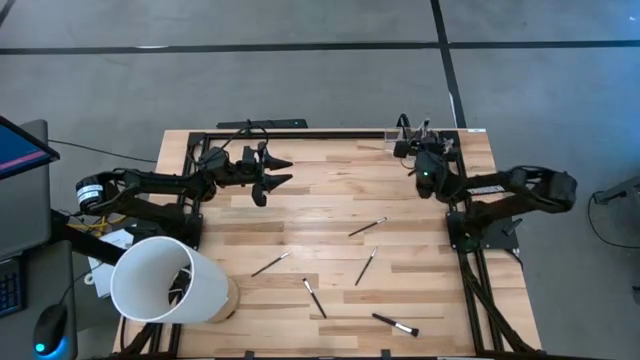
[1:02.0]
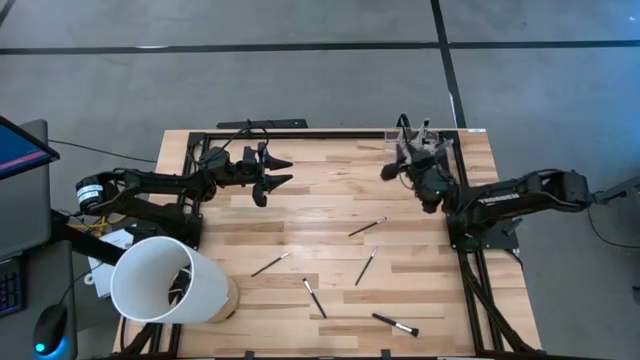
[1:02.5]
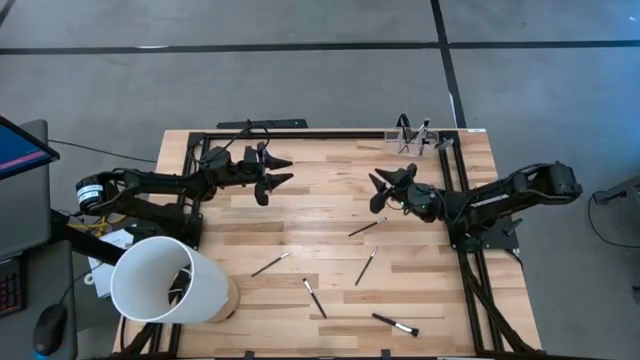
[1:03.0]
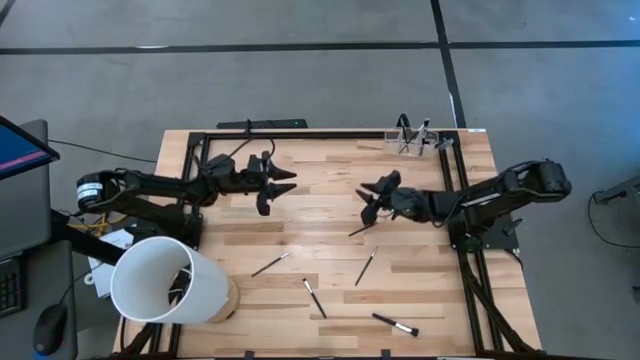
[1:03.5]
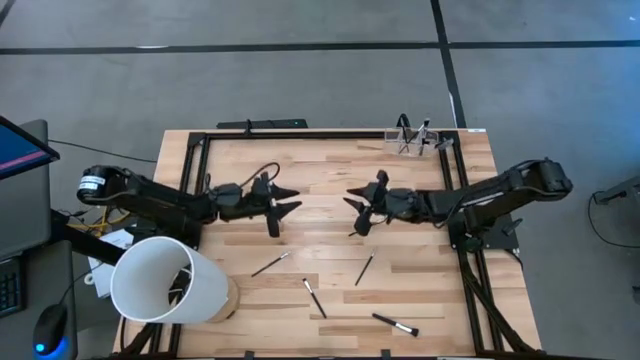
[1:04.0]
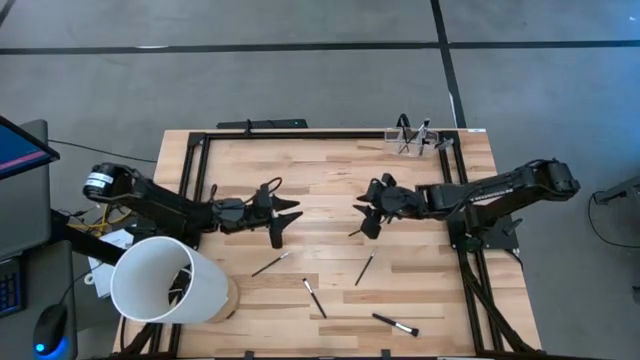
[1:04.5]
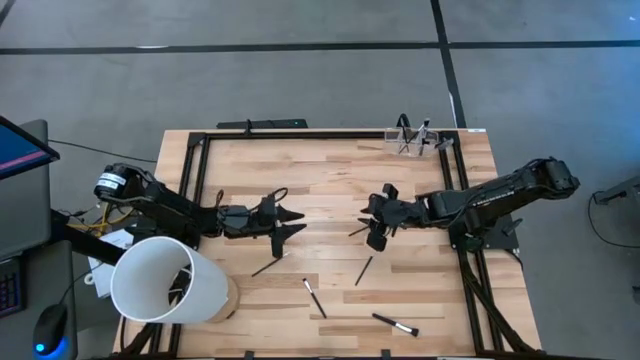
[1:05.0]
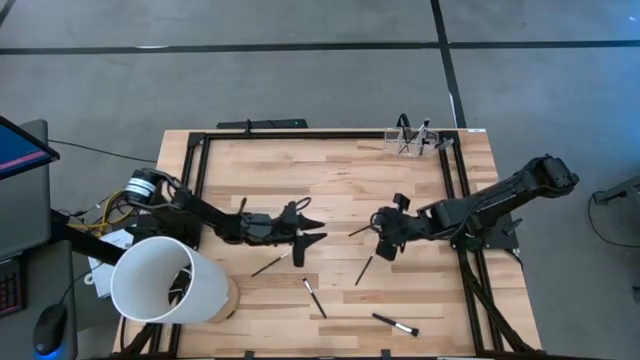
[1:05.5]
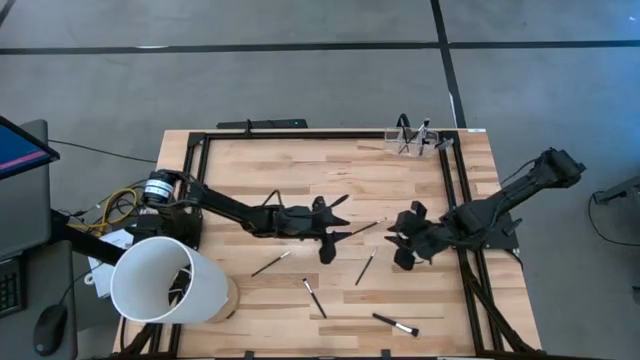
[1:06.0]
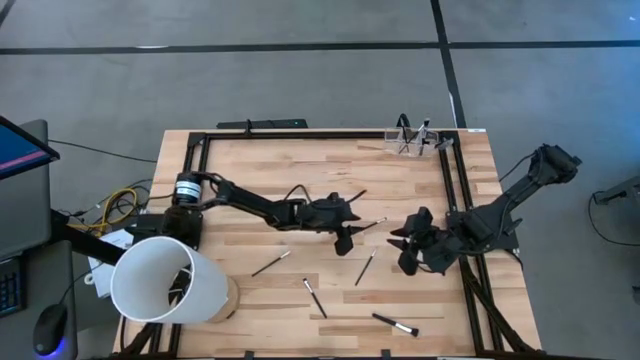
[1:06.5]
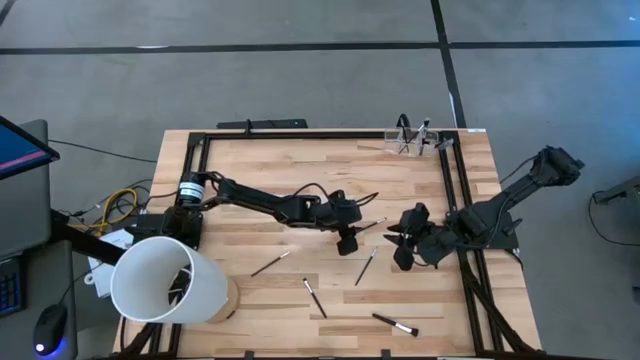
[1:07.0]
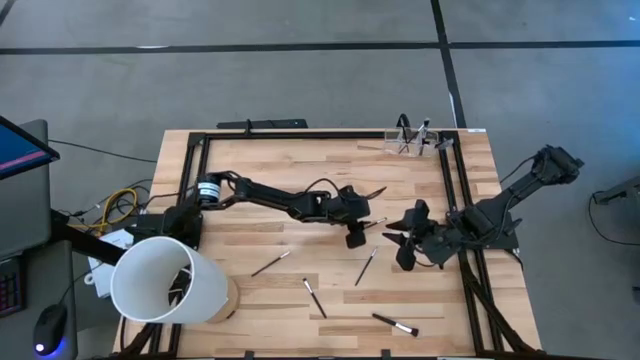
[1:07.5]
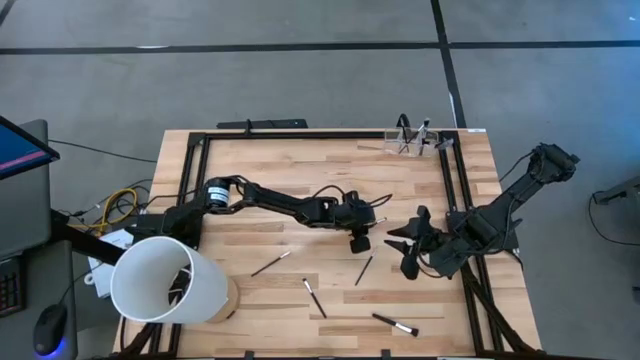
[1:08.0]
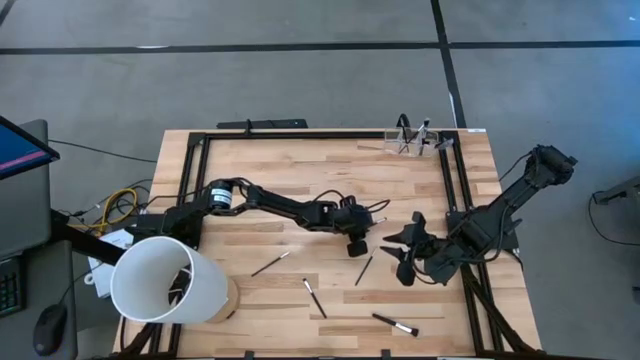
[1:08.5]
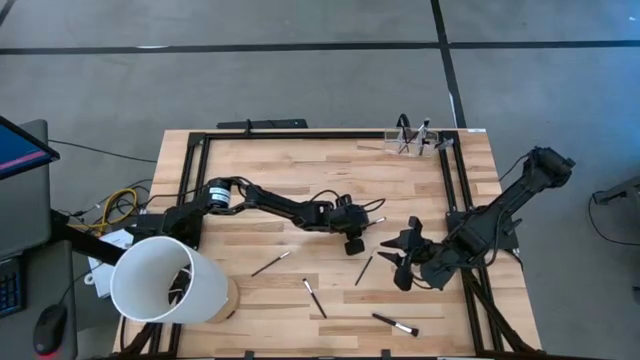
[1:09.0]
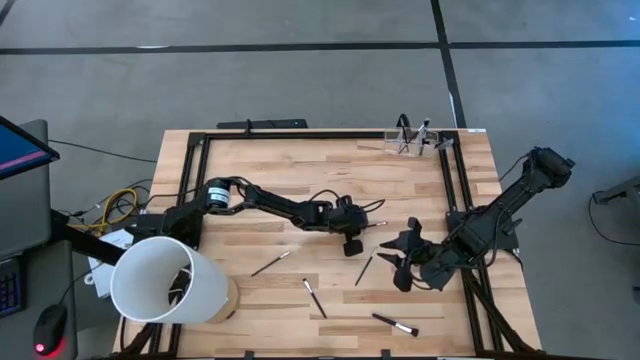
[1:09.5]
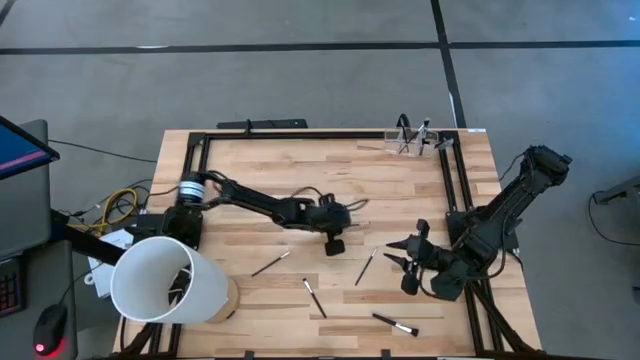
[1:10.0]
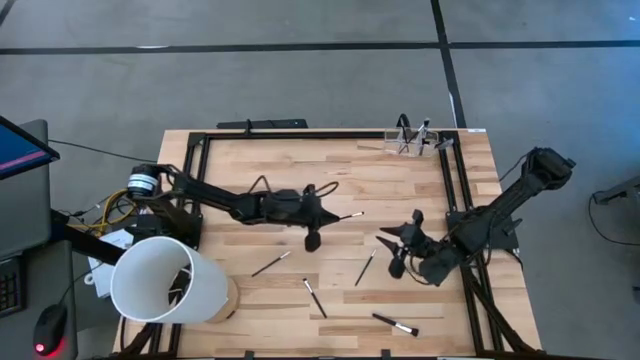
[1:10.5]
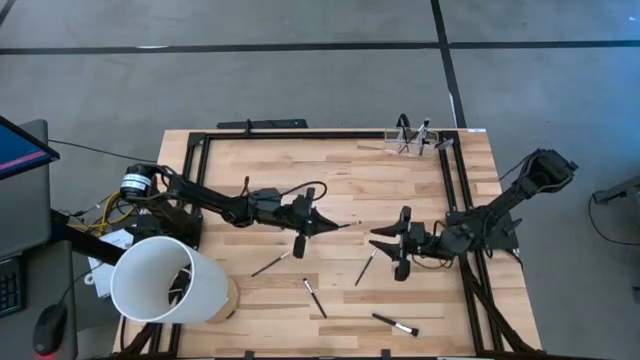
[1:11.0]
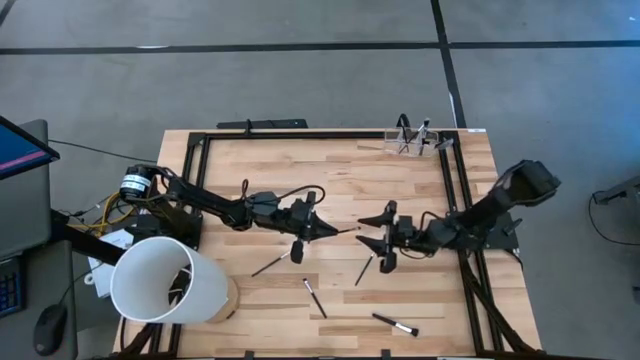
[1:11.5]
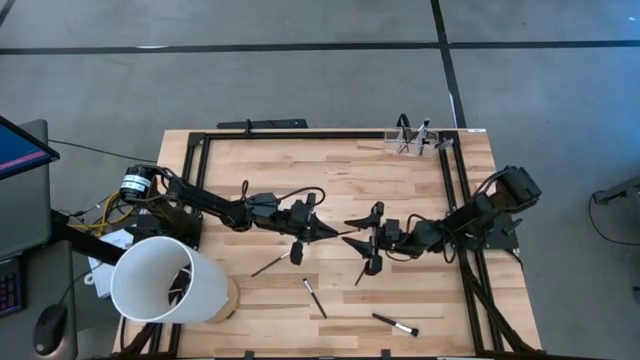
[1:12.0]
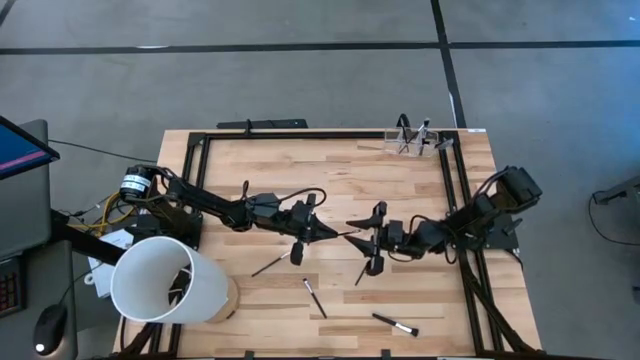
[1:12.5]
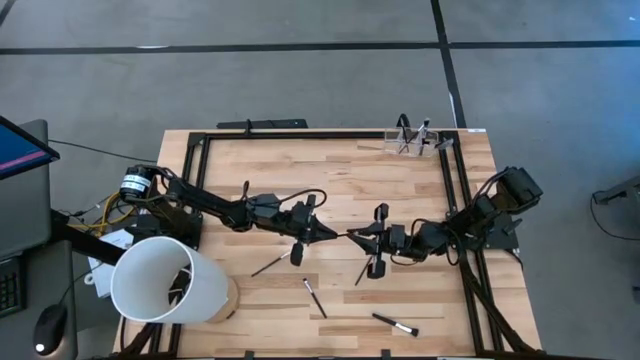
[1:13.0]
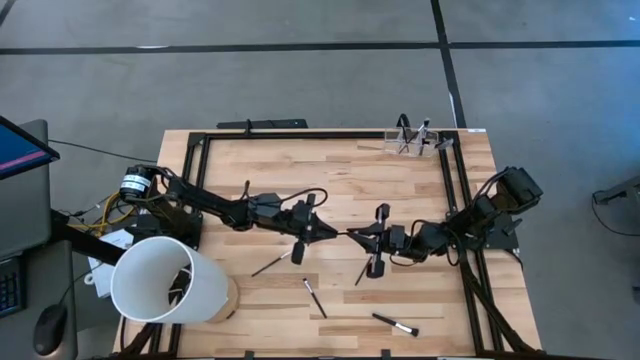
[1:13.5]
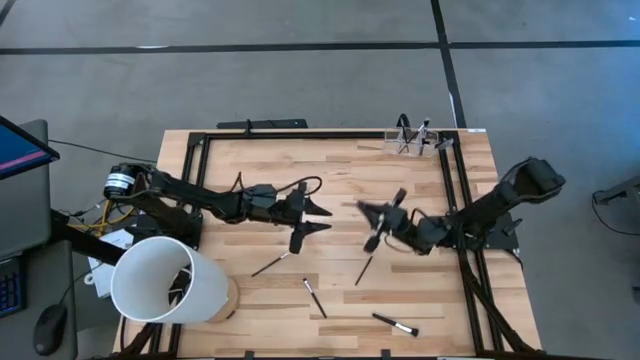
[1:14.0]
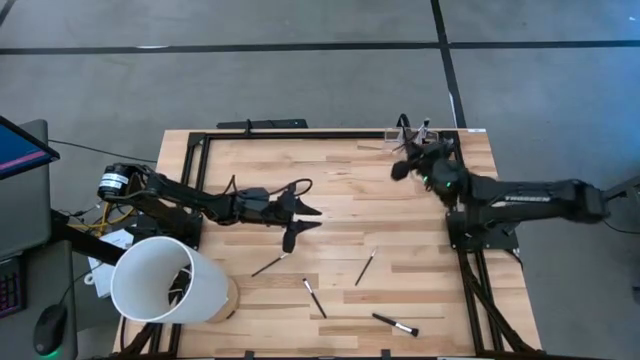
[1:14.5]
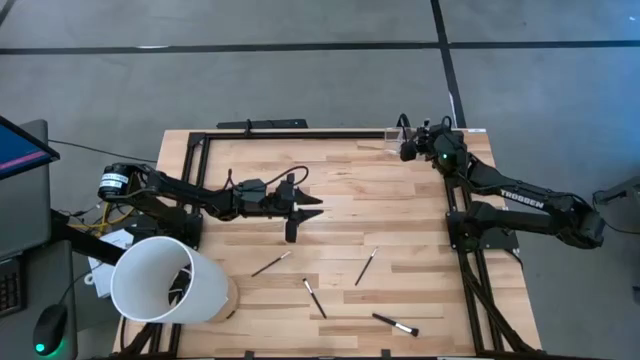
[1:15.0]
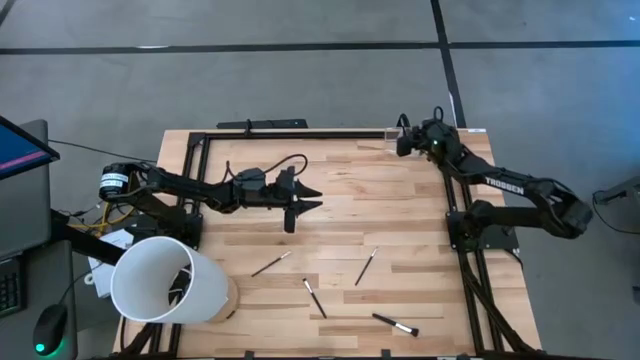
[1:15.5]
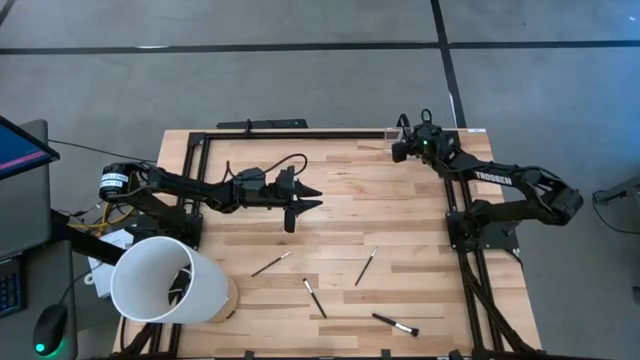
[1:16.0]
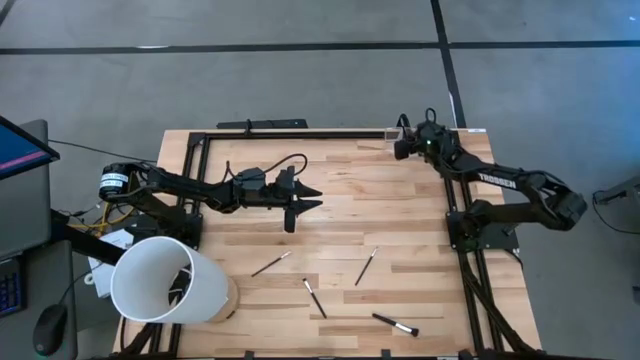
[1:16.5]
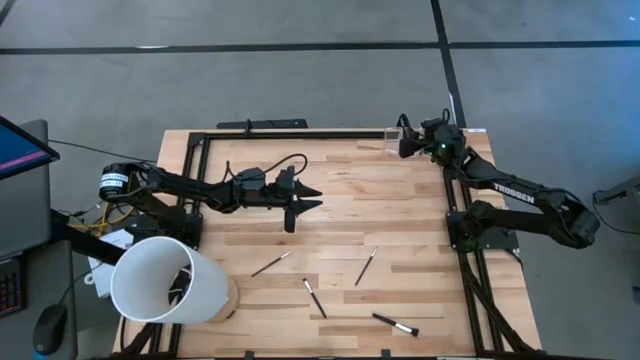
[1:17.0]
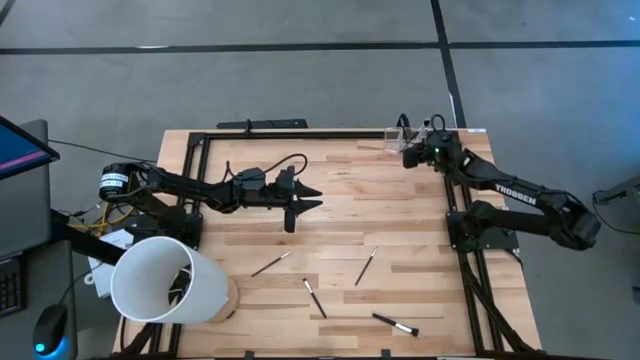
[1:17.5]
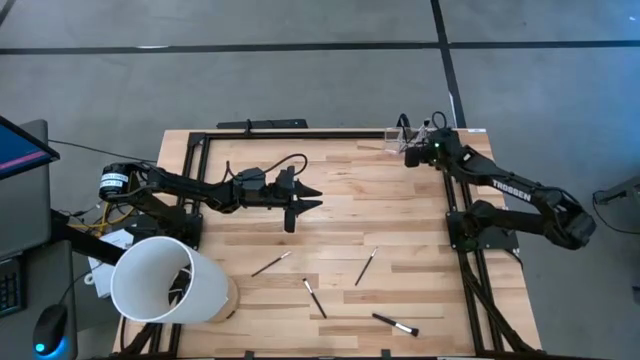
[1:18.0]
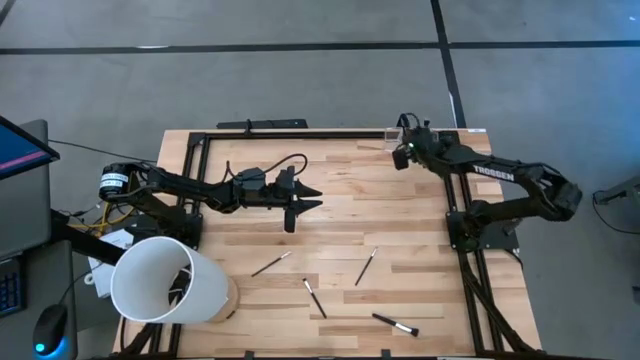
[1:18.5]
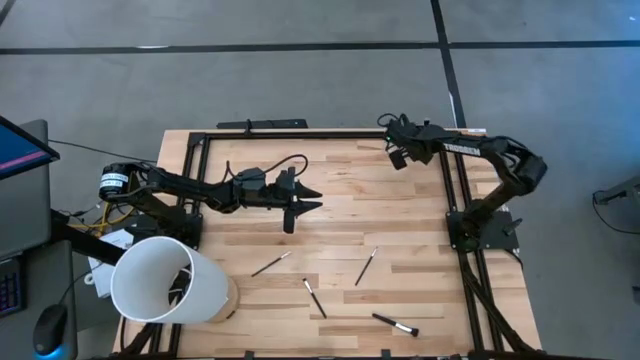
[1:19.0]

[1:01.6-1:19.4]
Task: Put items in baskets/containers
Put the black eyeshadow brush into the middle section of the transparent organizer
